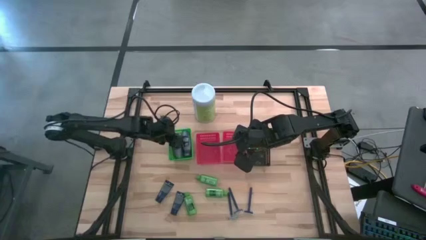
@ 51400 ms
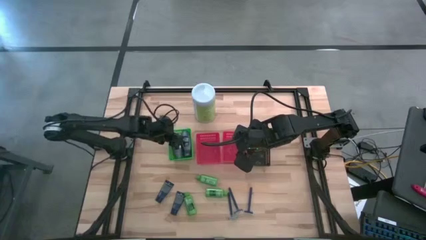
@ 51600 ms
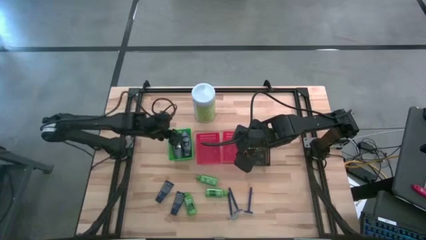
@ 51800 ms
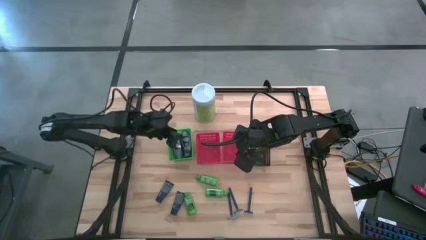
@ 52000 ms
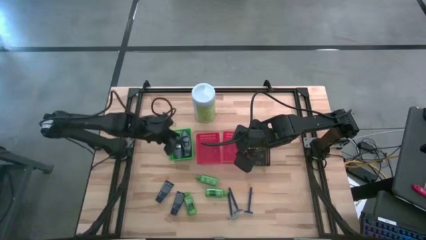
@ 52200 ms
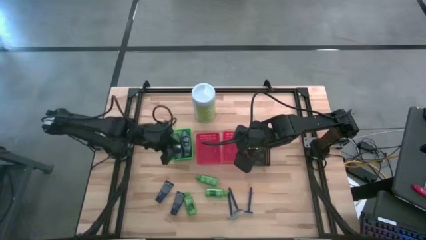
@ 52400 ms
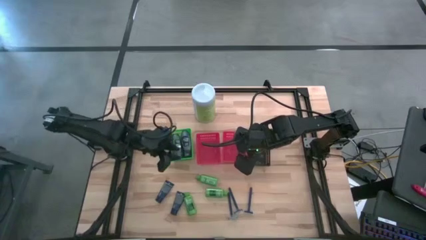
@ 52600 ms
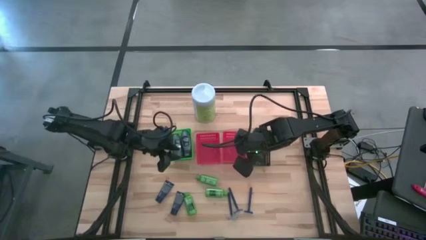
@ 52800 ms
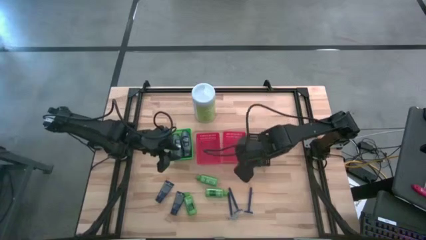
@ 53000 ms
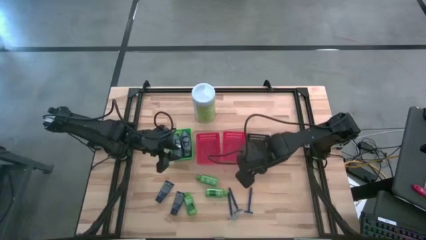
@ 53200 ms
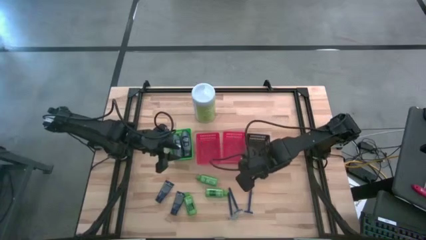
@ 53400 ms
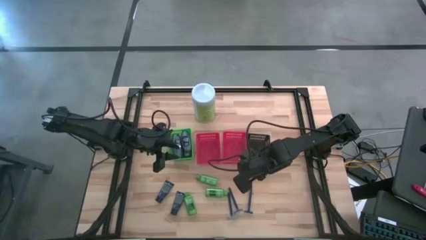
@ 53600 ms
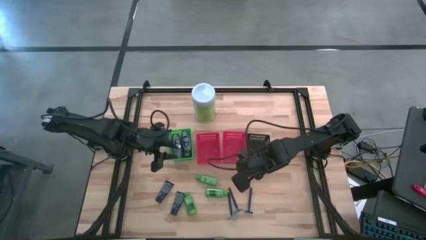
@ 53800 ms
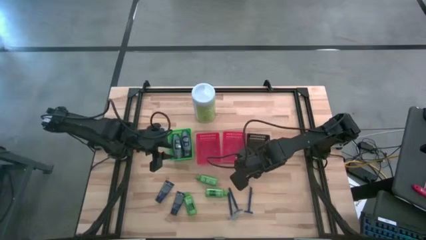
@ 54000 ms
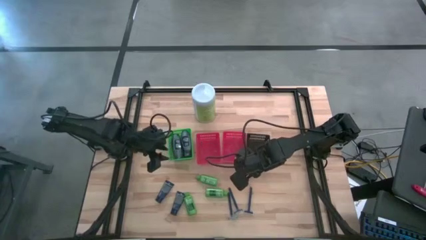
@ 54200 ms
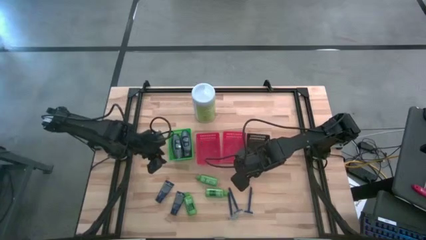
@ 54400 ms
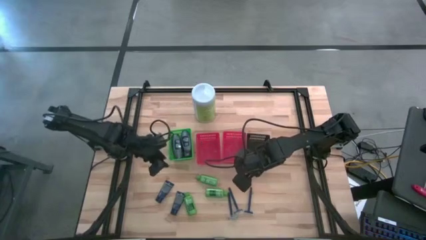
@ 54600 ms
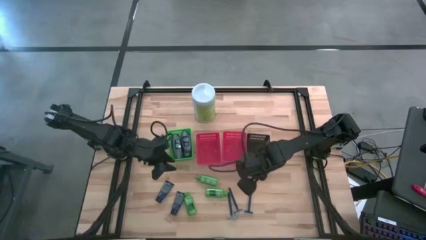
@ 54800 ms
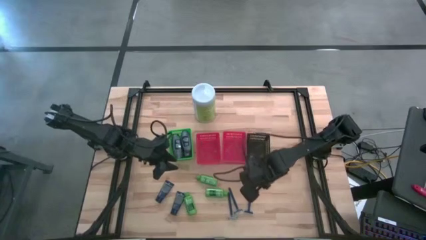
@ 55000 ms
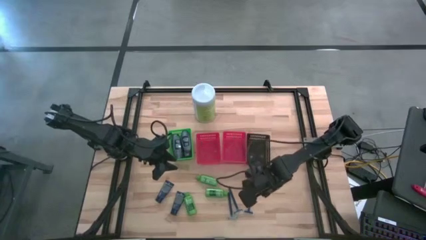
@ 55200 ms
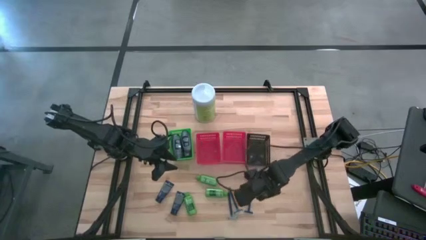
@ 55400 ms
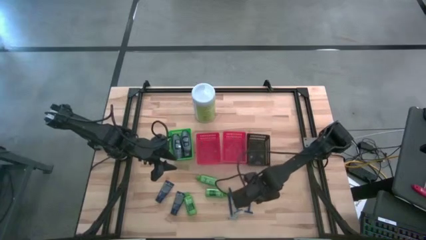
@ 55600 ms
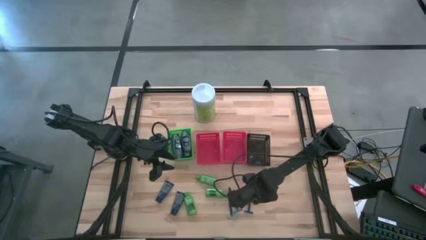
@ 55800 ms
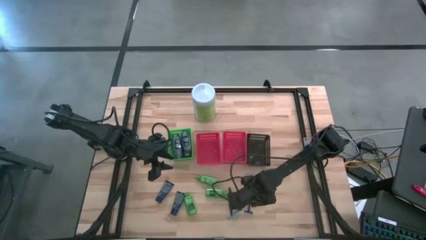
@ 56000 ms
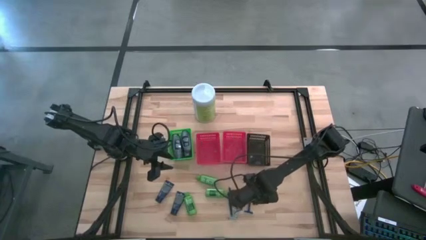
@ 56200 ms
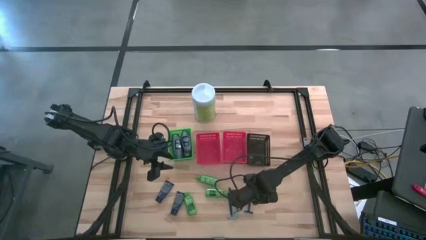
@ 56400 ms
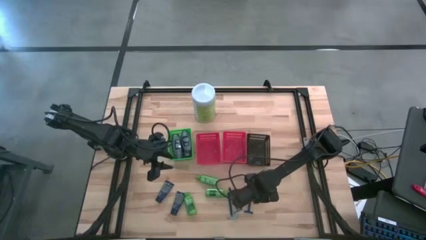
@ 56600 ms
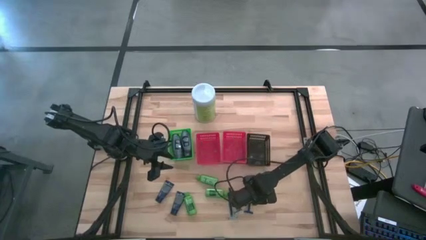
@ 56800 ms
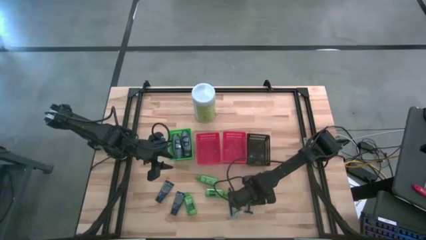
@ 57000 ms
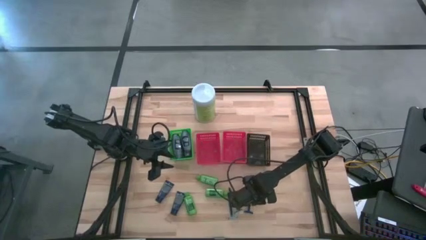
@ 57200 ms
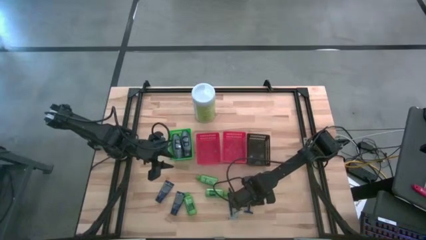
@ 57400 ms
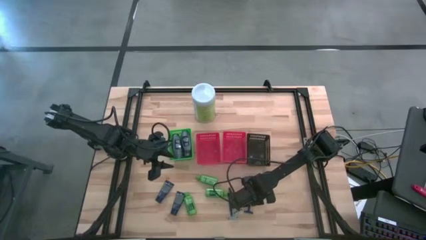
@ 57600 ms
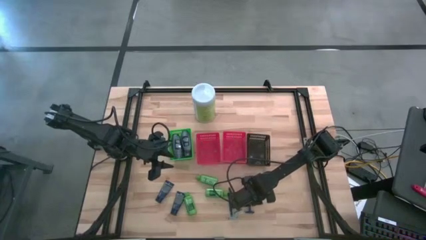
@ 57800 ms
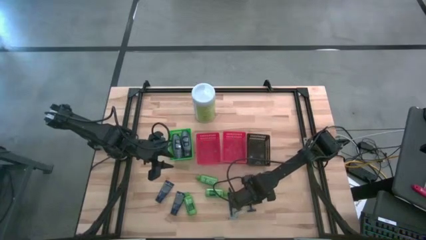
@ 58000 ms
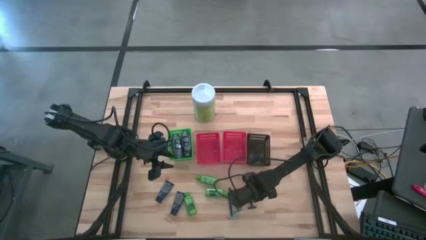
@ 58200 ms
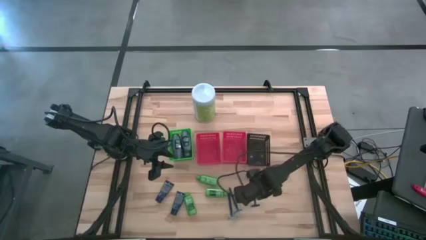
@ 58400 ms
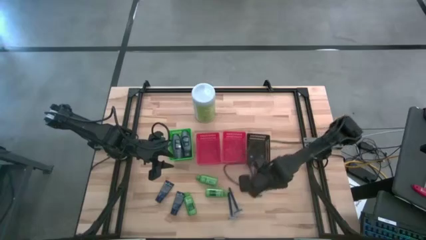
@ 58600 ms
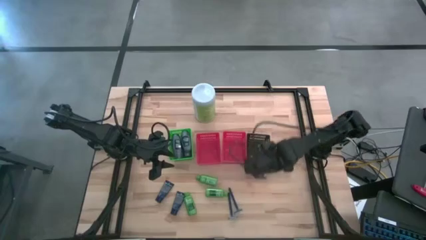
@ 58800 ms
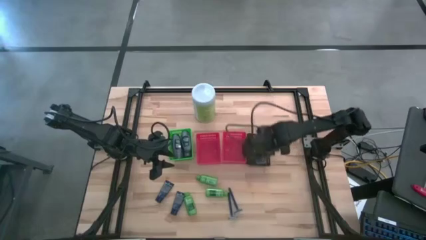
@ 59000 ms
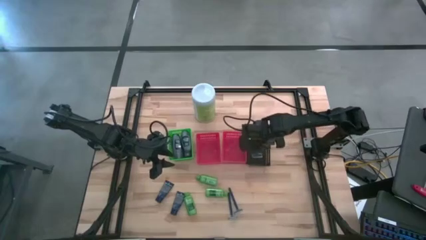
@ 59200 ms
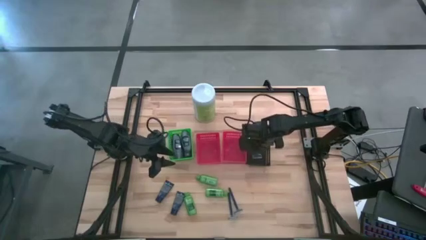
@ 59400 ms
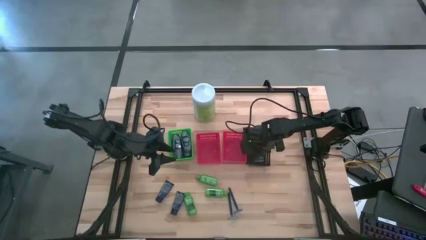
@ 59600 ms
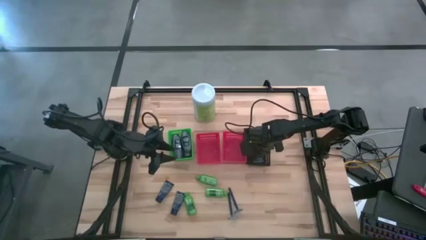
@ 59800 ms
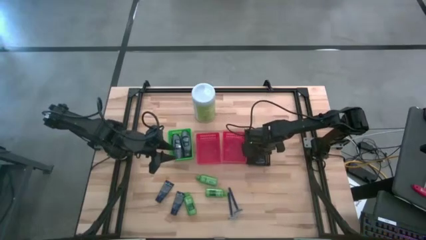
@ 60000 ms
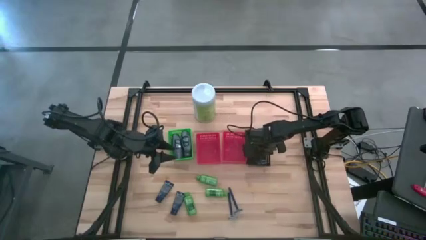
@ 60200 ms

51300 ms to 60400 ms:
Task: Pick & Place Travel size toiletries
Put the right blue razor into the black bin

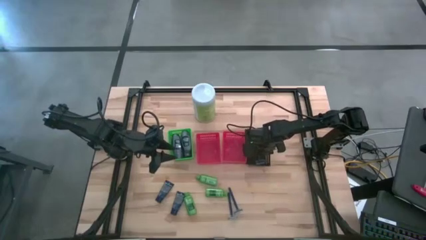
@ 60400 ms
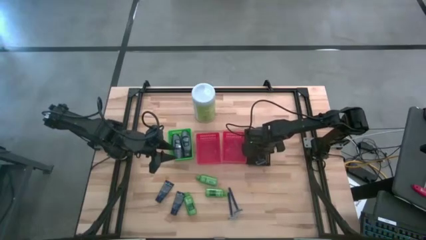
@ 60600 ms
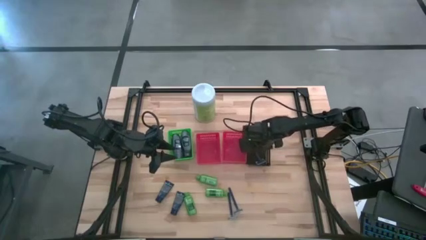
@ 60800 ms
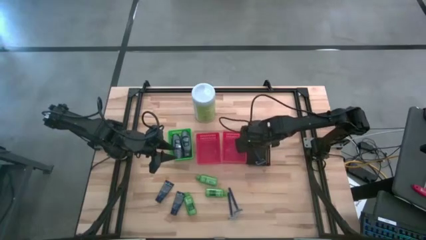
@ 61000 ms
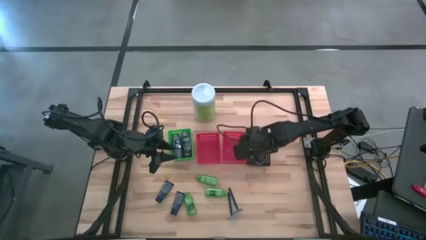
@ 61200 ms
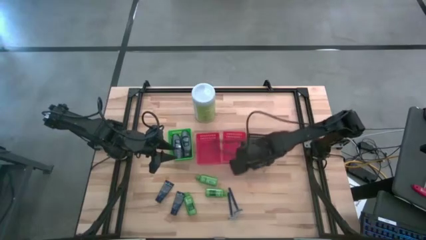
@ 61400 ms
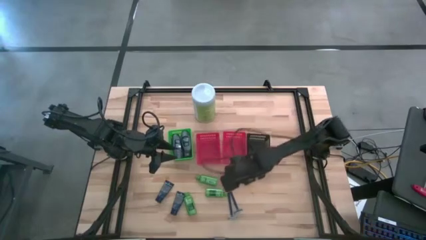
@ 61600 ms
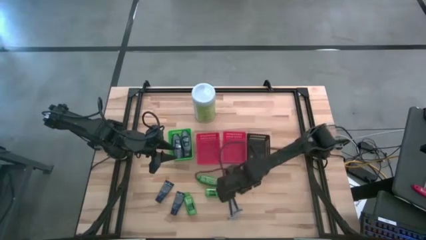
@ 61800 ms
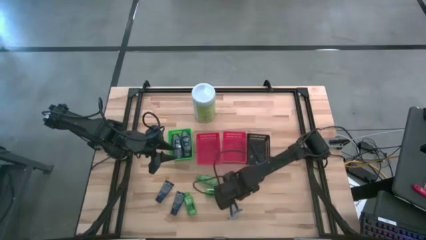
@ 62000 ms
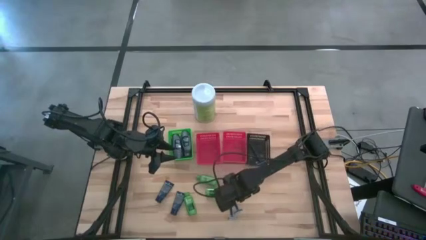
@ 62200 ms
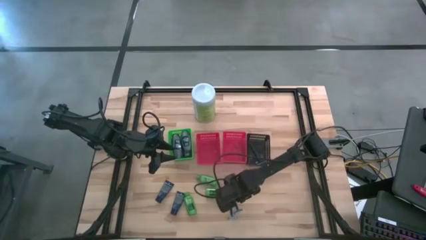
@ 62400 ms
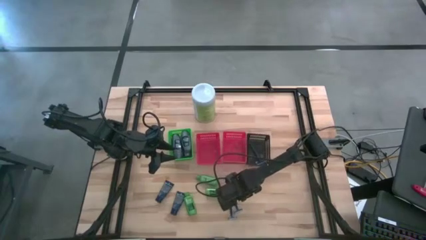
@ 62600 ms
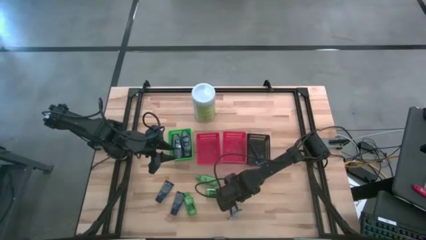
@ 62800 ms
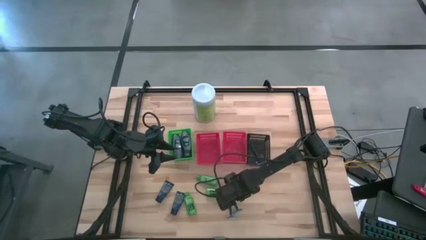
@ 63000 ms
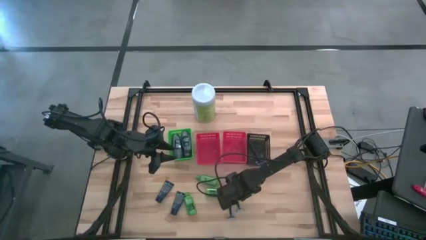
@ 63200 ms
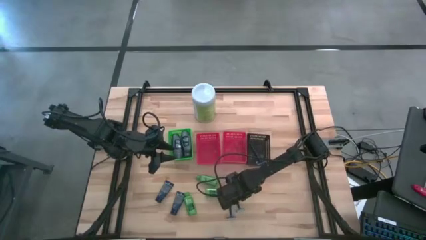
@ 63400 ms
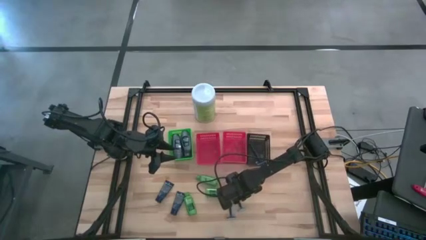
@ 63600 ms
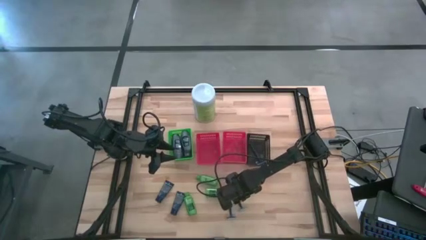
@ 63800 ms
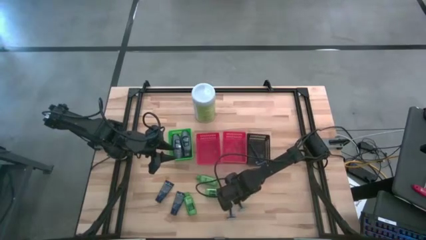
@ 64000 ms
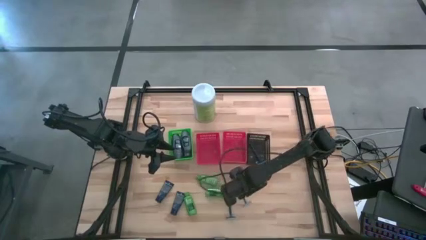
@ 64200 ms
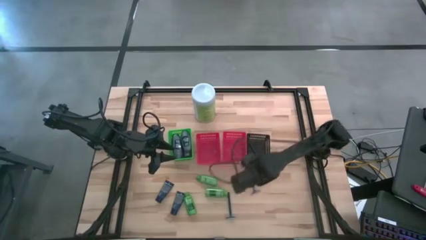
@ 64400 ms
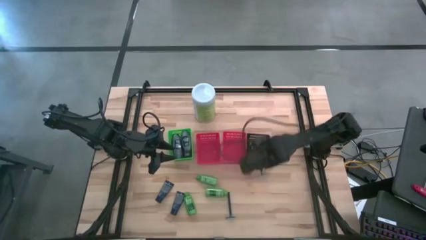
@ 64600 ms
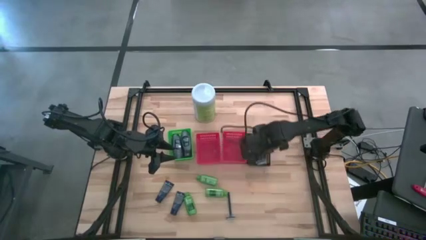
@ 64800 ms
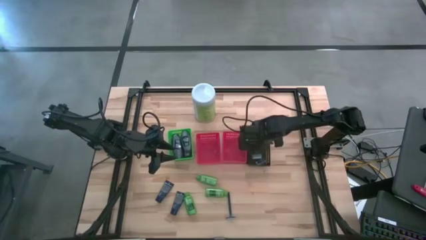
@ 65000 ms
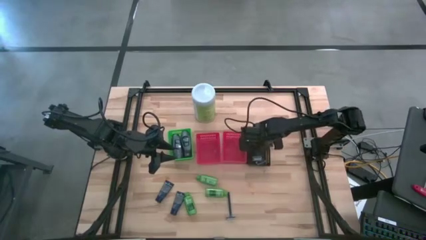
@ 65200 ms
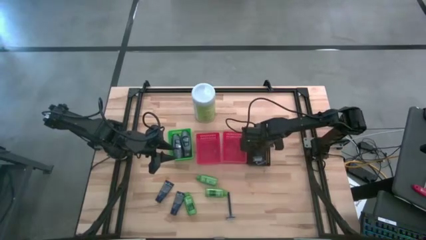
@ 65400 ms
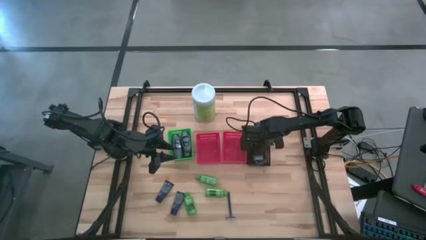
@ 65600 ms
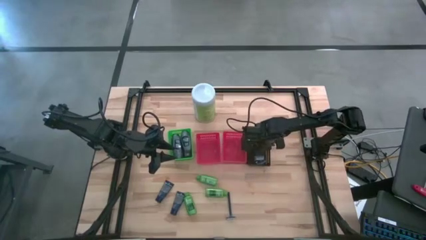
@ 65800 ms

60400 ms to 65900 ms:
Put the right blue razor into the black bin

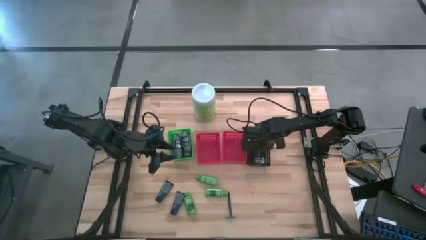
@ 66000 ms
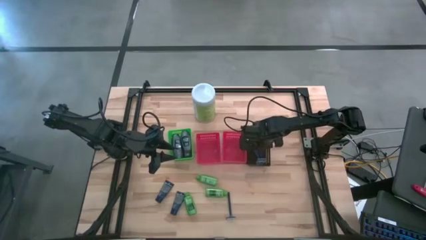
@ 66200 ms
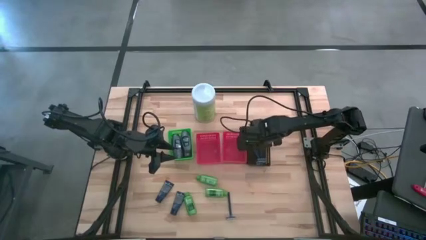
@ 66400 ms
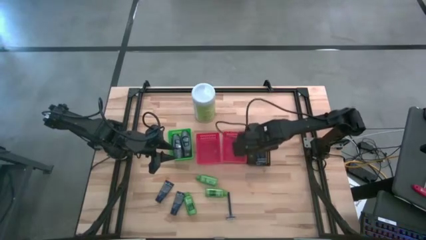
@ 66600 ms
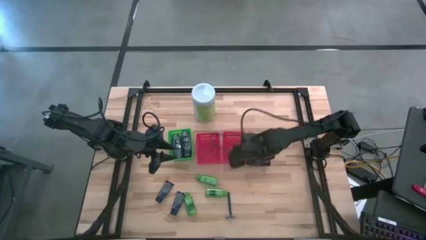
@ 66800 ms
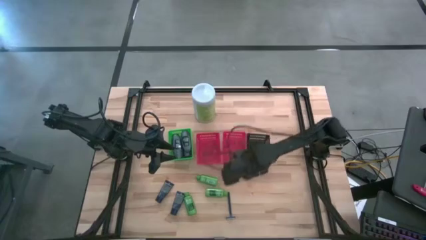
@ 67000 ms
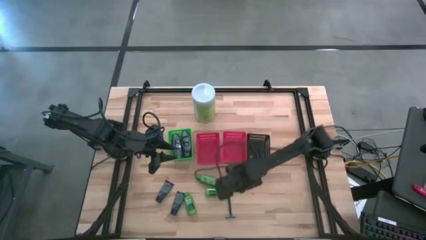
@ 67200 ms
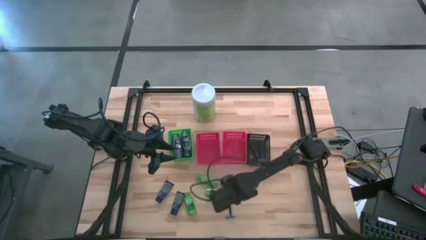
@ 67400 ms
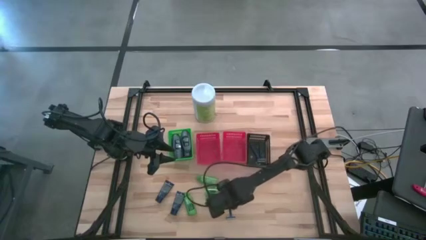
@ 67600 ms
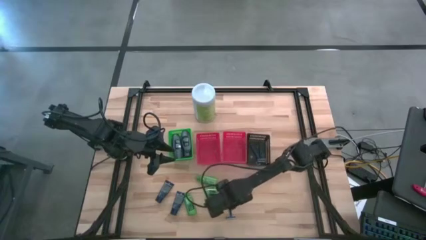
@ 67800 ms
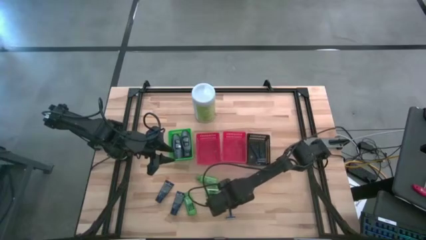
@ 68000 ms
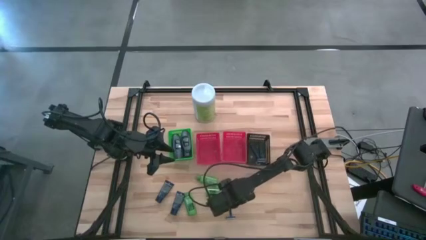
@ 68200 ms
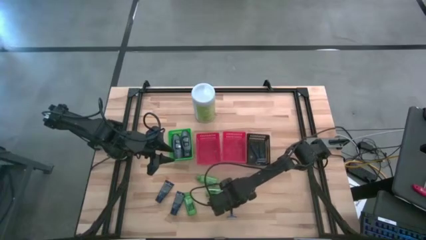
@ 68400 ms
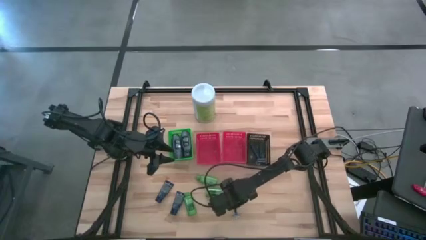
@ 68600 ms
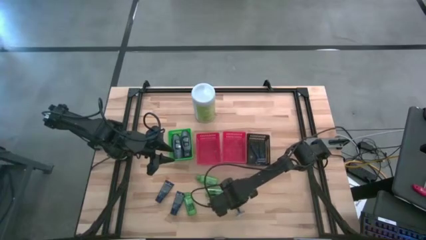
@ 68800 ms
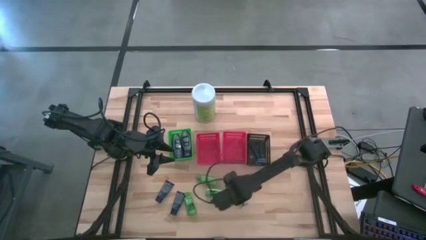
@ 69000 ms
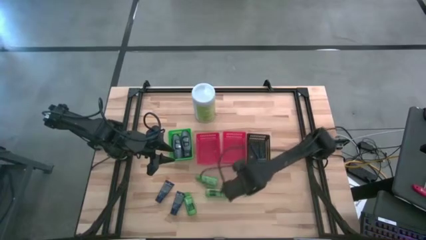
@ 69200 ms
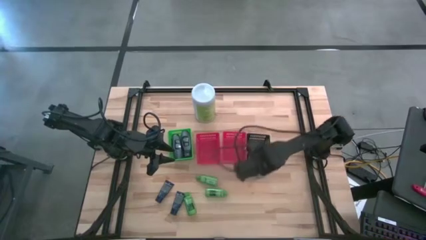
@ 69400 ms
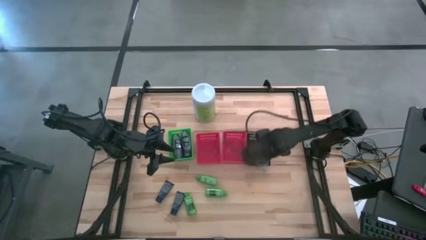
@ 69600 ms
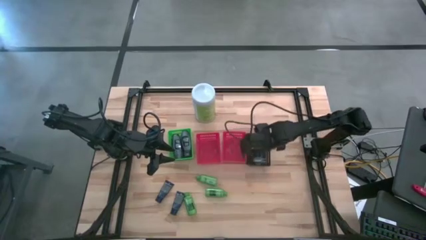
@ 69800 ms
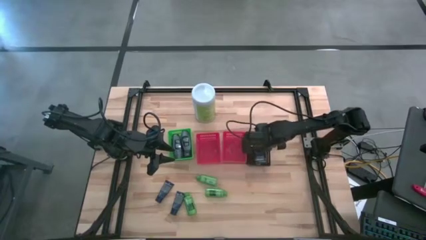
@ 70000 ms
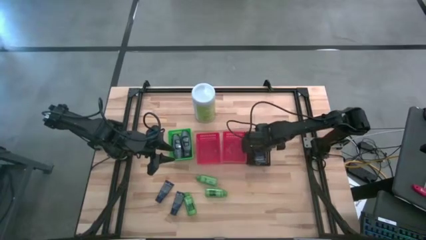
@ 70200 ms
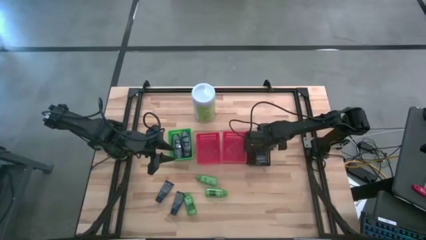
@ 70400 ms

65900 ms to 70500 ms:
Put the blue razor into the black bin
